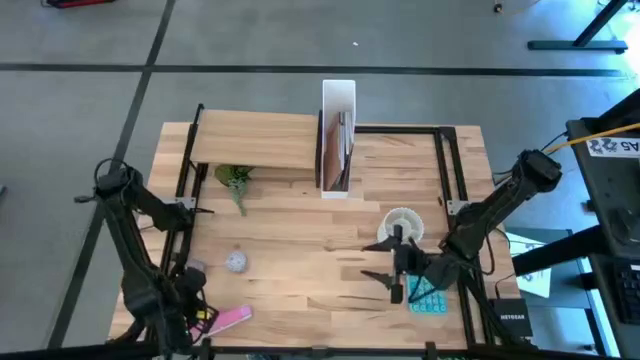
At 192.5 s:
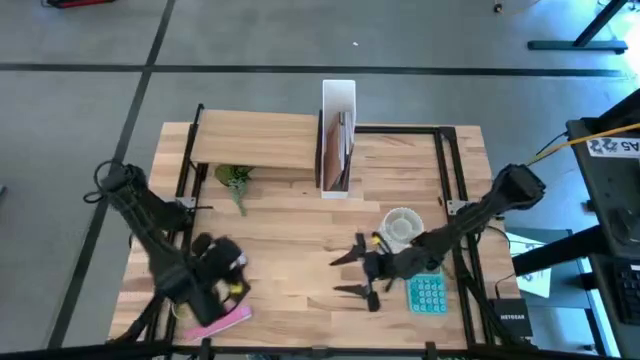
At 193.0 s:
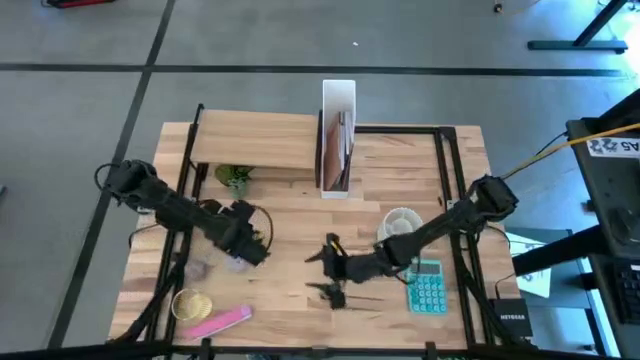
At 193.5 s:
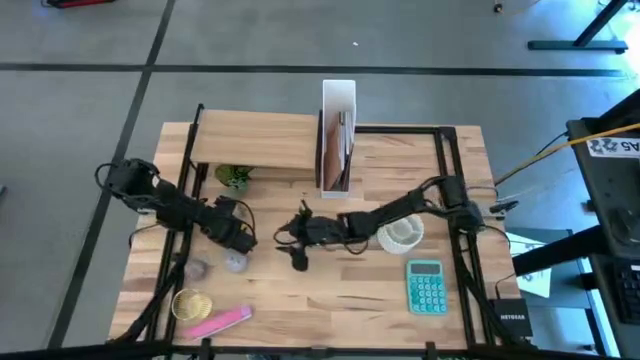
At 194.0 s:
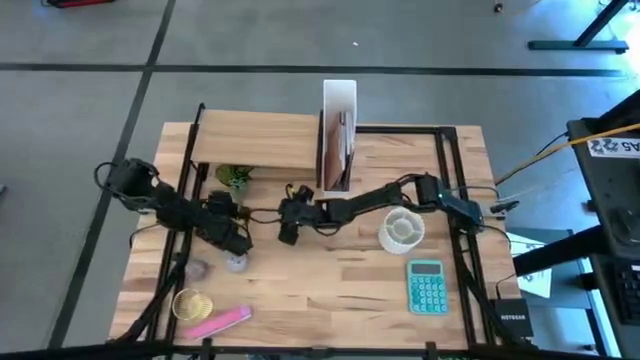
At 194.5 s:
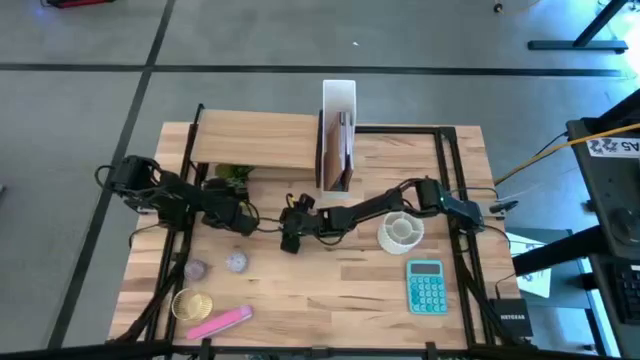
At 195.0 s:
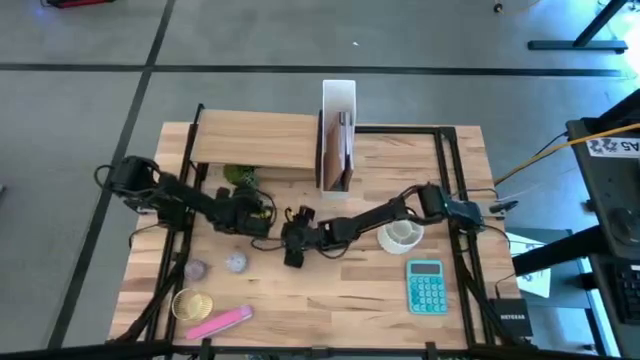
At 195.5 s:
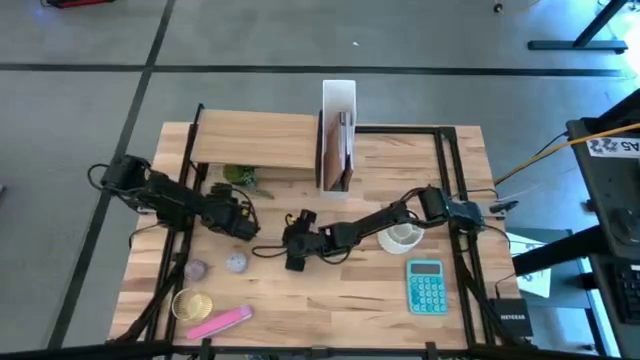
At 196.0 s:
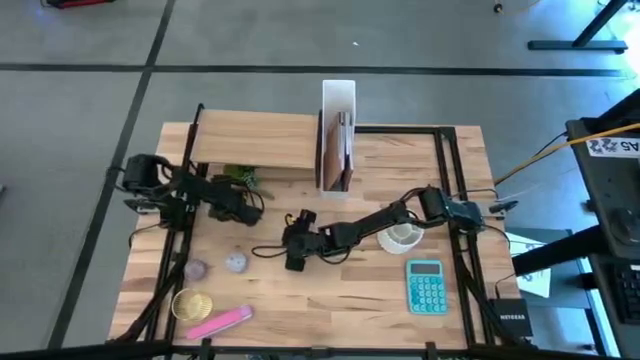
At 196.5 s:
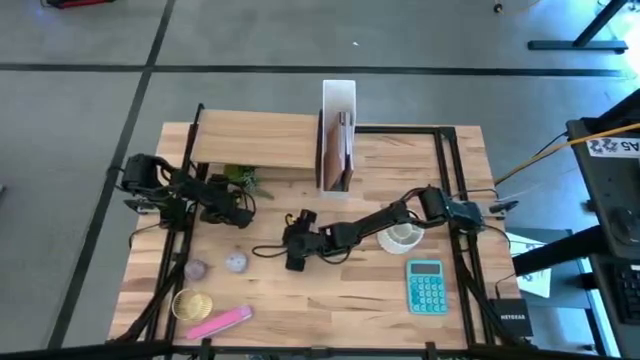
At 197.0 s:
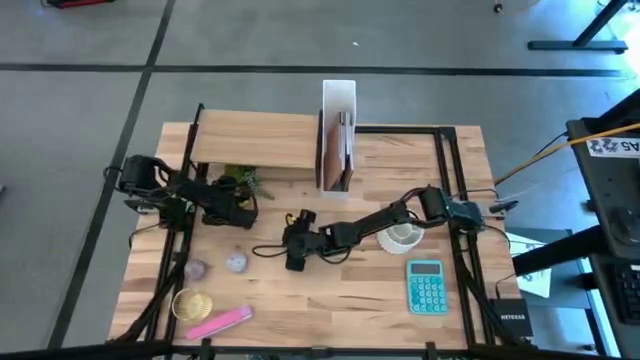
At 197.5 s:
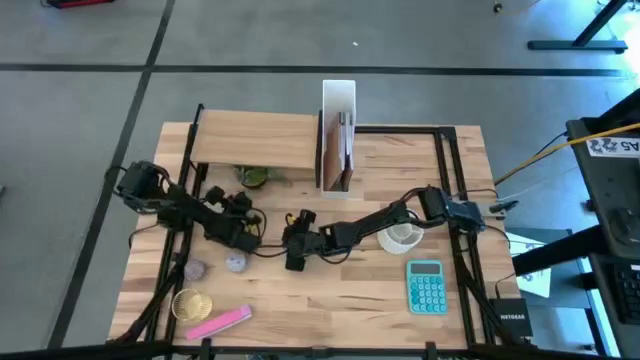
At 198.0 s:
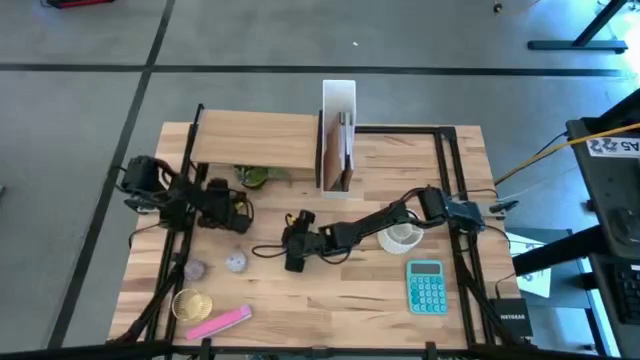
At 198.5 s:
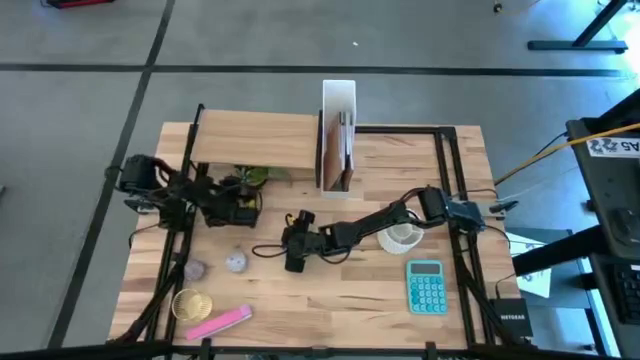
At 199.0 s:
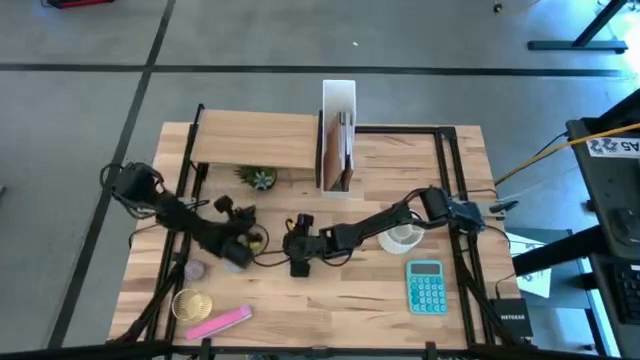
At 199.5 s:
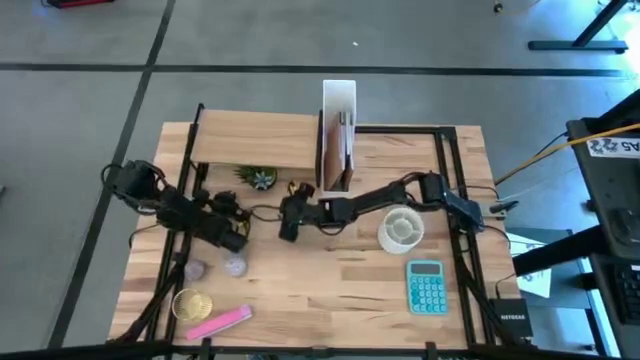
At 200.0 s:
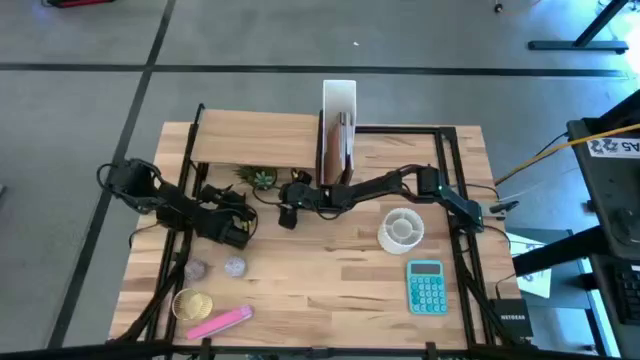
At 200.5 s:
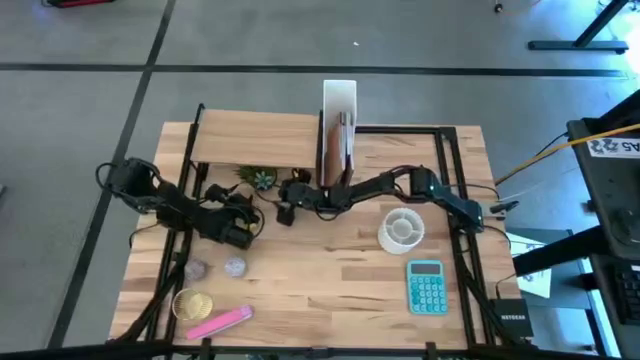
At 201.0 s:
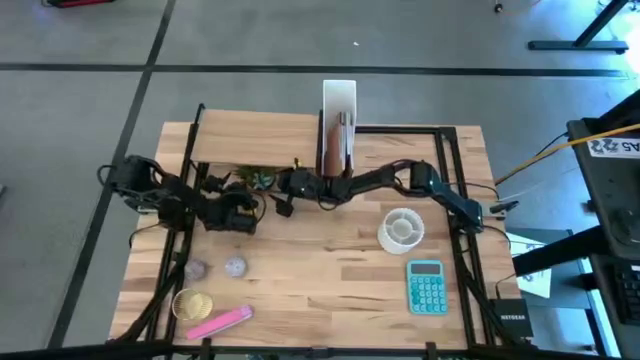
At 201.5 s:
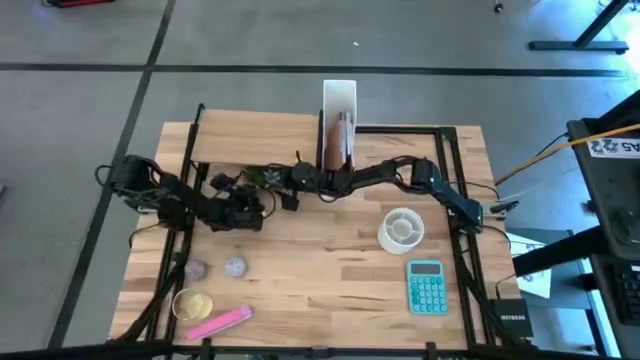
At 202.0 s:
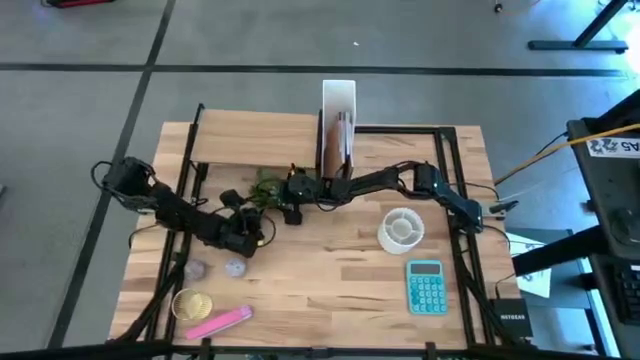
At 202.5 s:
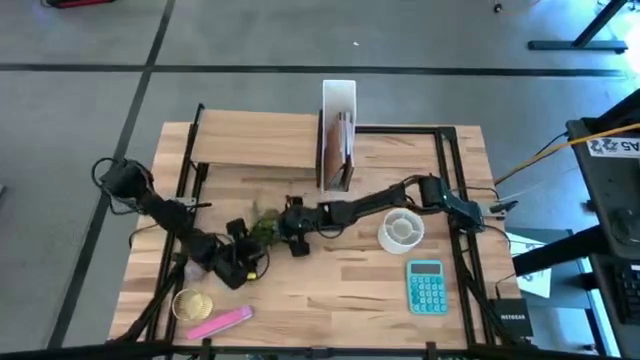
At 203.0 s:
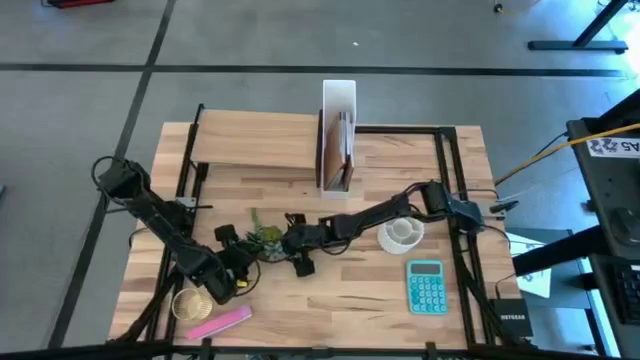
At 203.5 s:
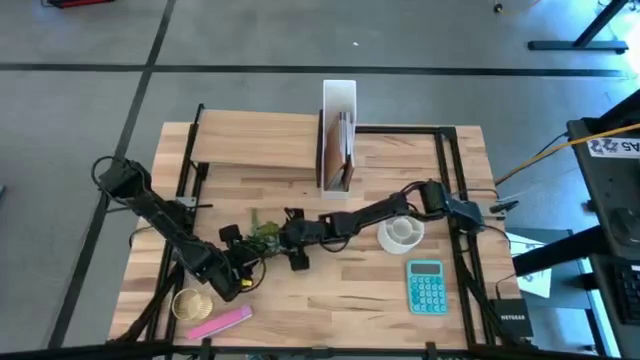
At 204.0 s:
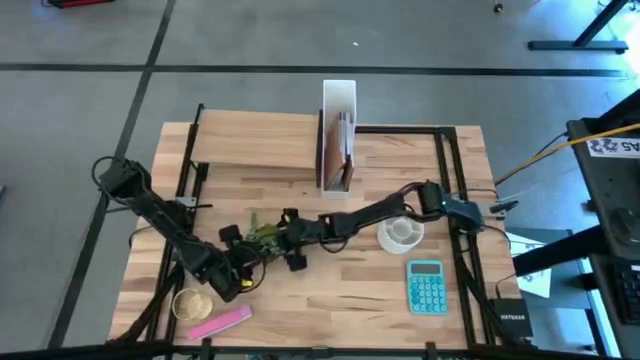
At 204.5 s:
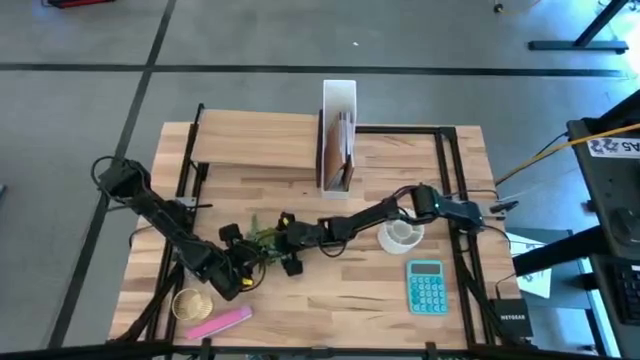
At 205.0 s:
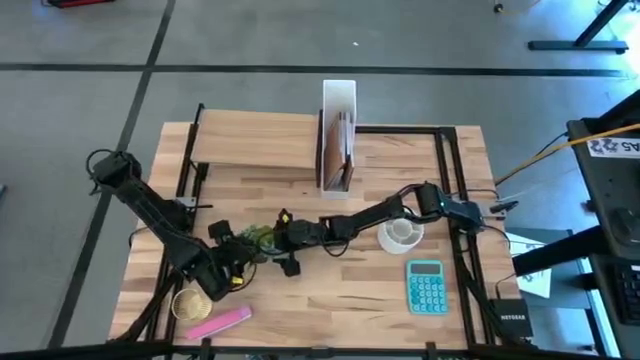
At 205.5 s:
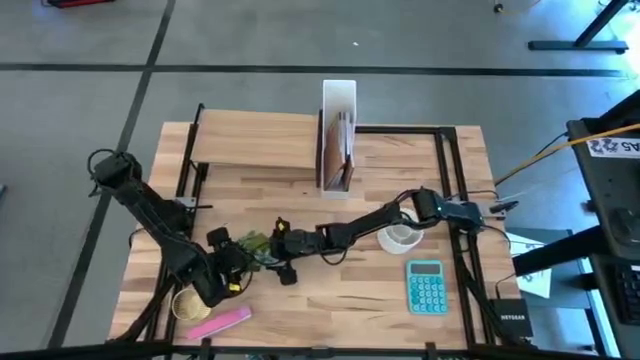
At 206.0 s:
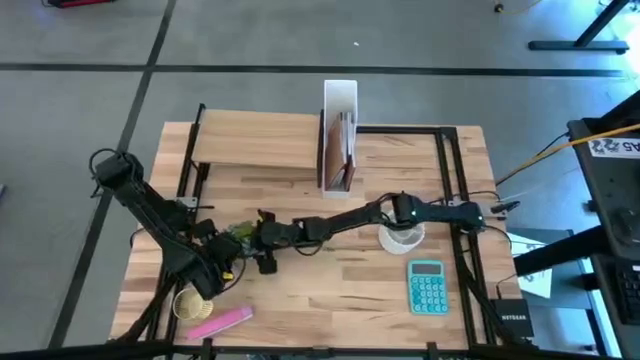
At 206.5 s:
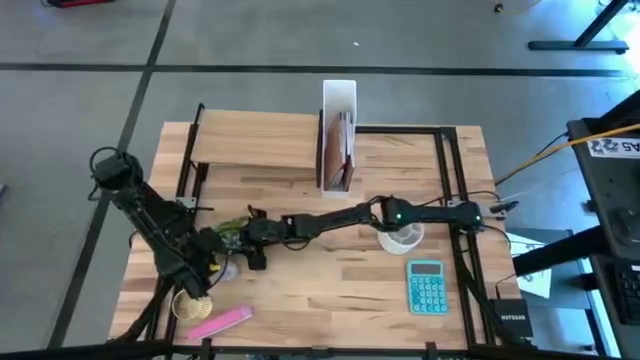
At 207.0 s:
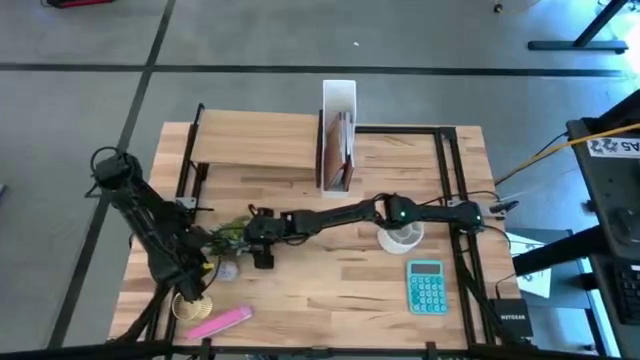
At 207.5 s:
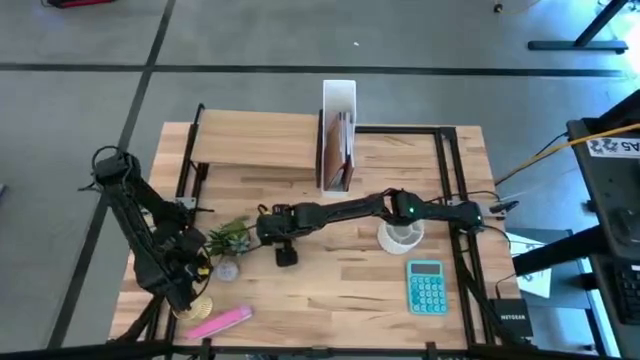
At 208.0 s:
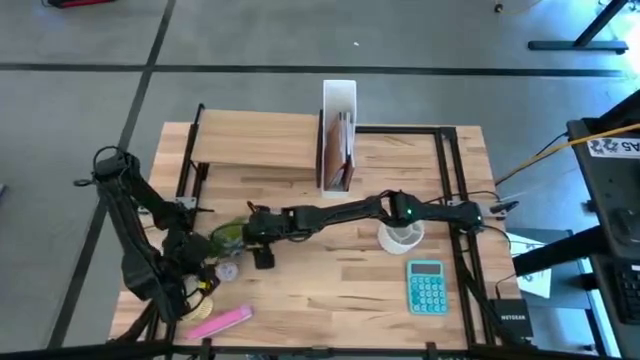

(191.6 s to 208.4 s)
Task: Stock shelves
Remove the plant pot from under the shelf

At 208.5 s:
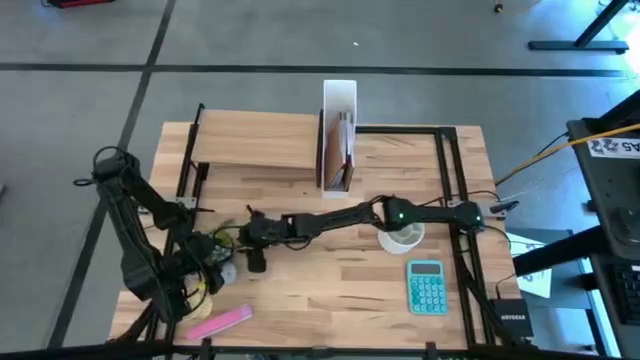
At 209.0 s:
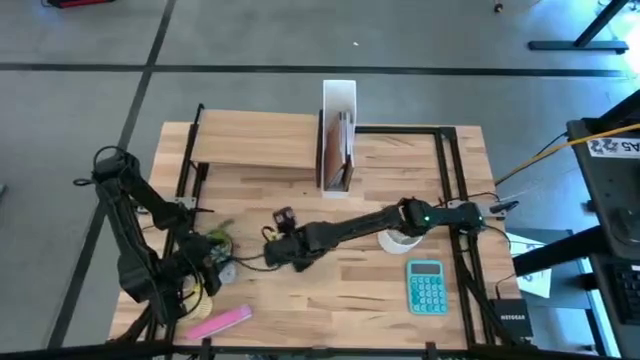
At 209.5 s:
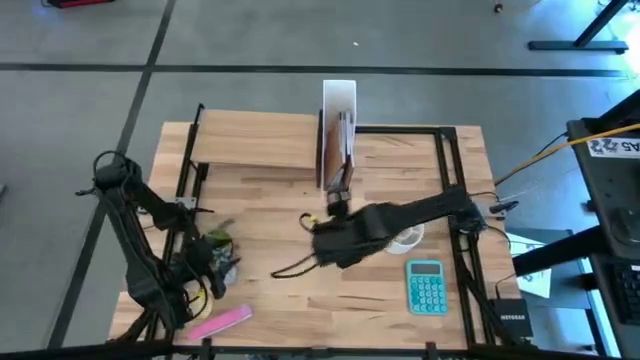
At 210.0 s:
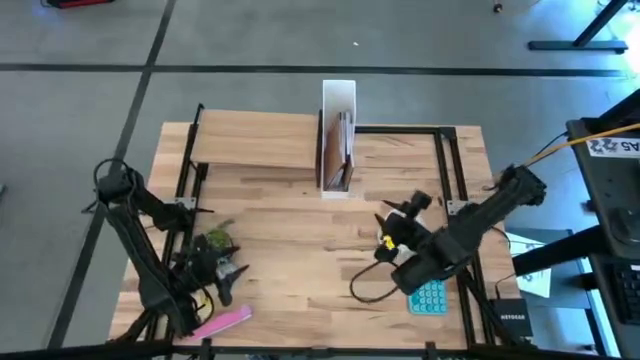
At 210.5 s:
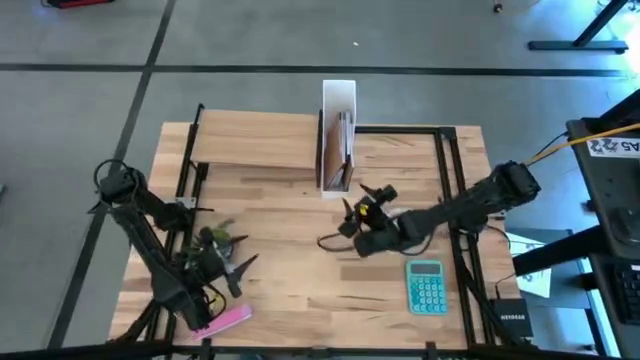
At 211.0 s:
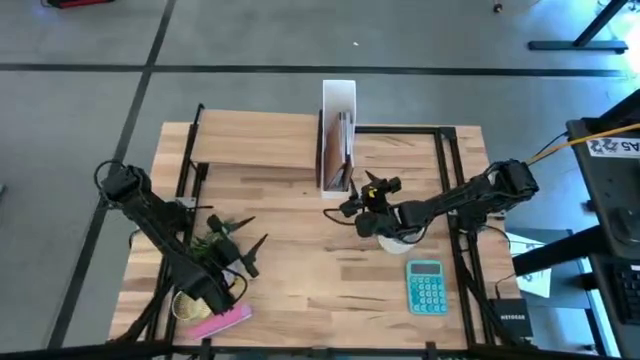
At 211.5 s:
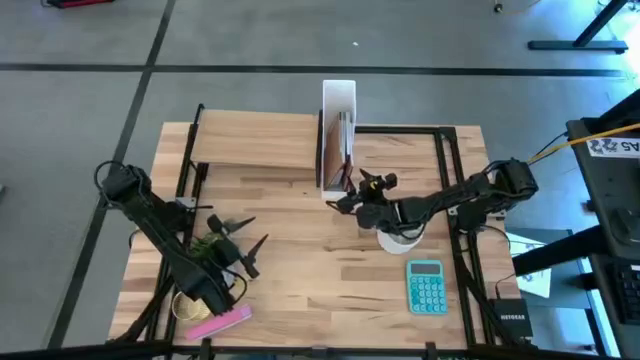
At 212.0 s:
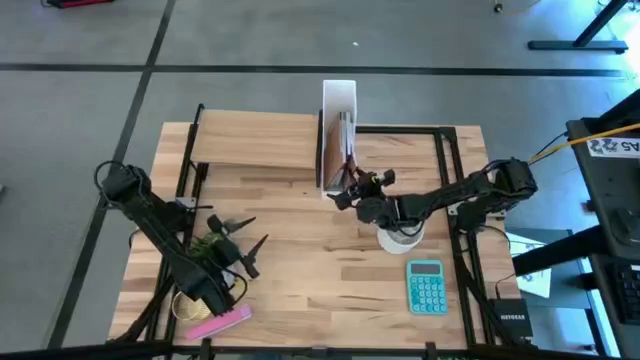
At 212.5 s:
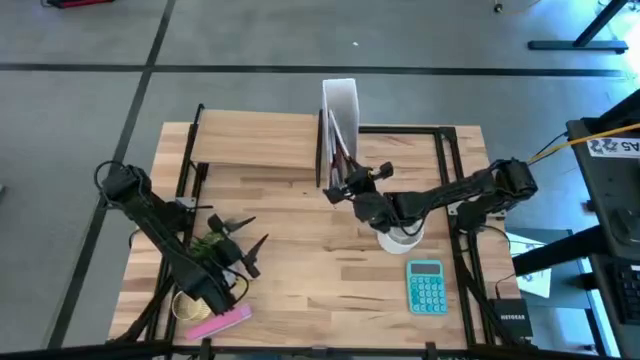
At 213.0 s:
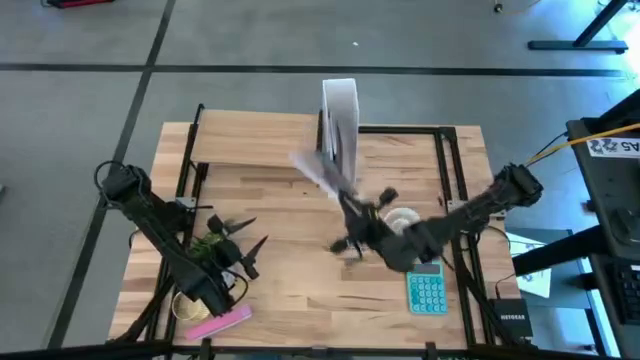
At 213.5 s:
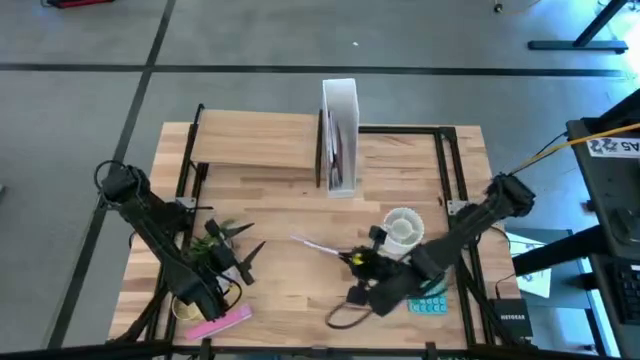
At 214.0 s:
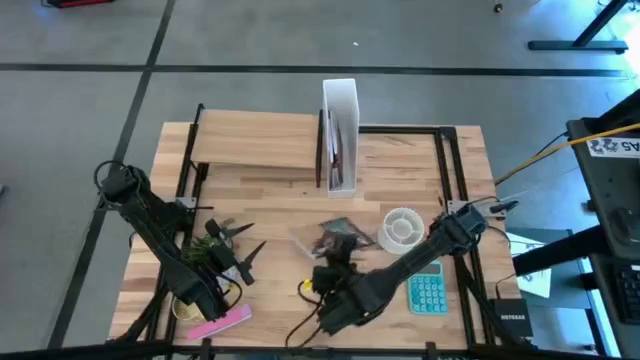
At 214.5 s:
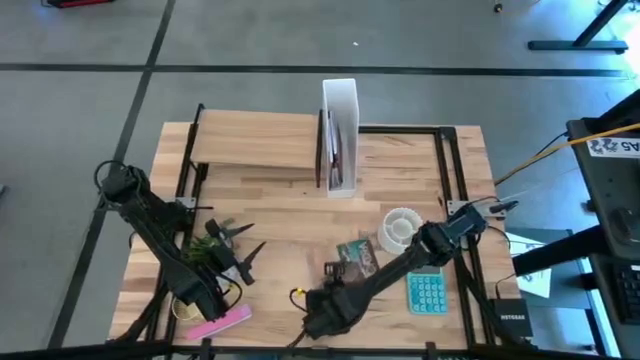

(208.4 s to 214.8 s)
Remove the brown book from the white bookshelf
